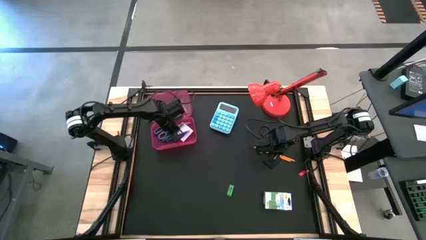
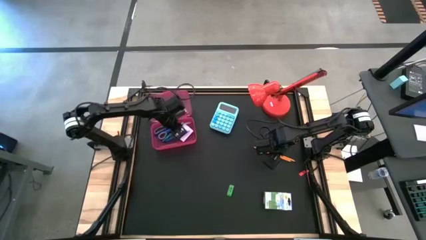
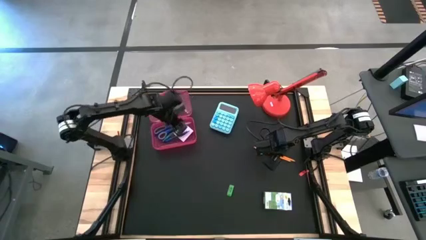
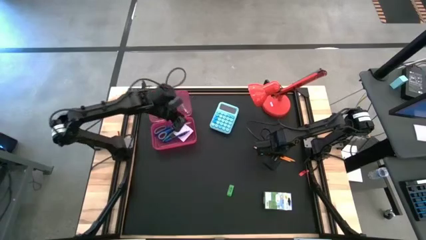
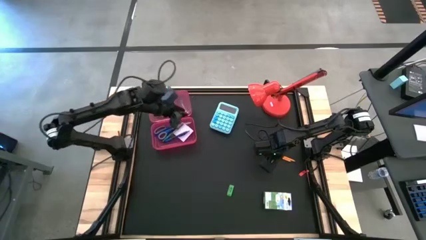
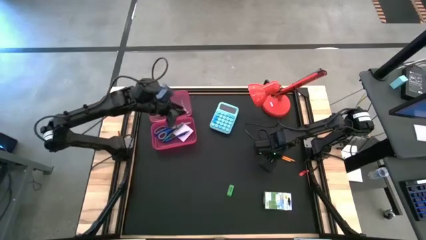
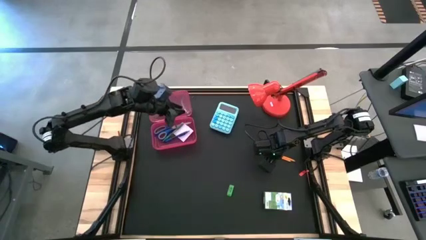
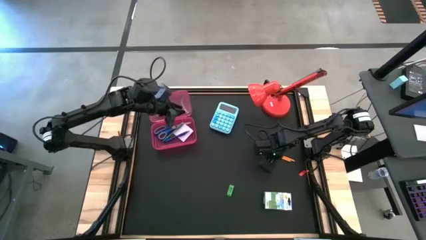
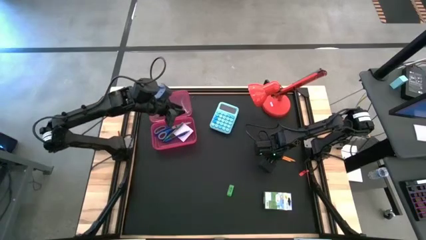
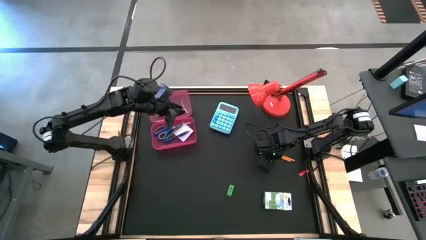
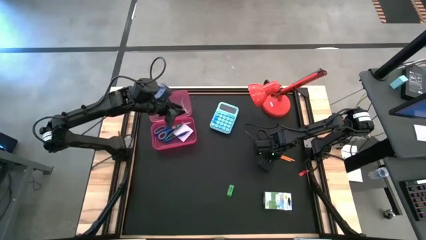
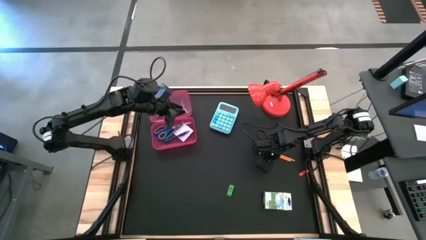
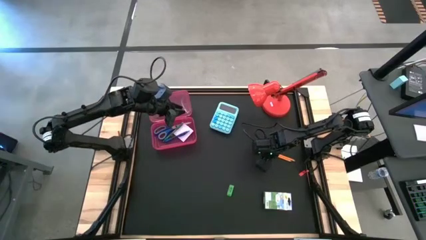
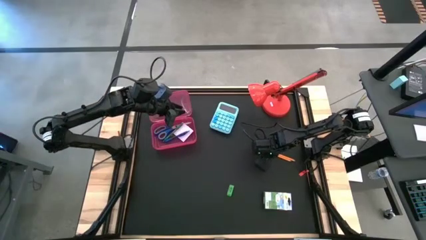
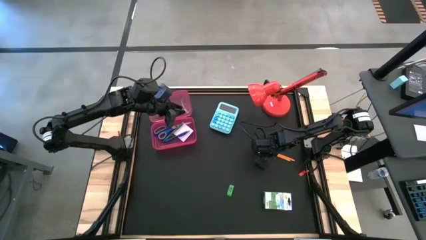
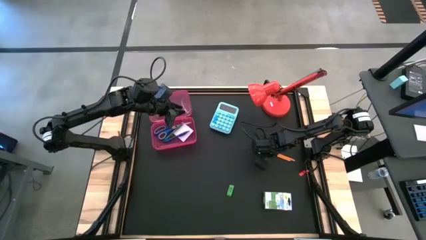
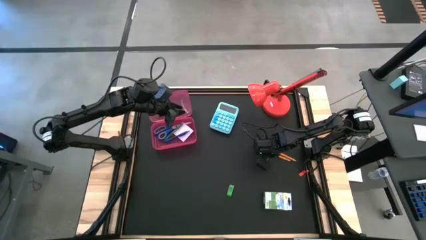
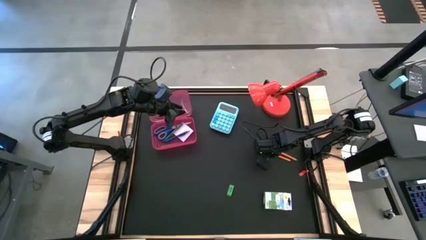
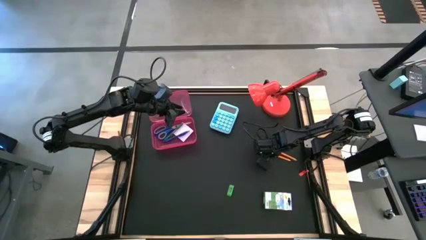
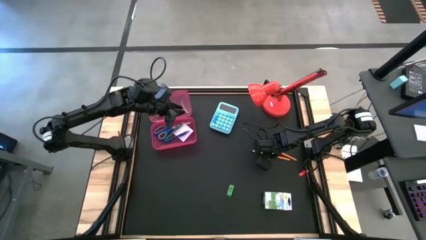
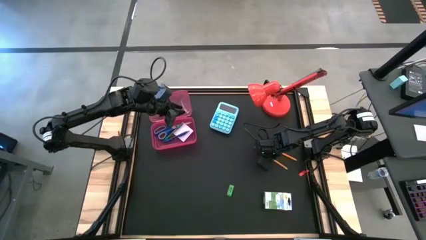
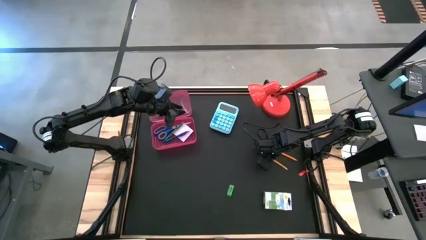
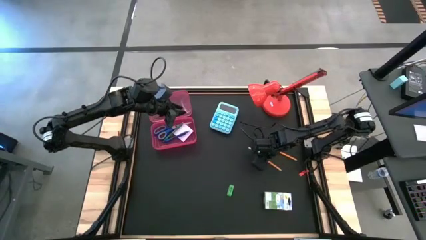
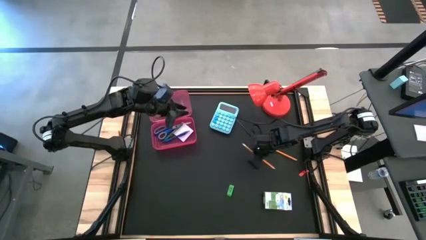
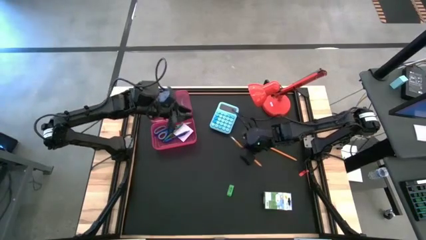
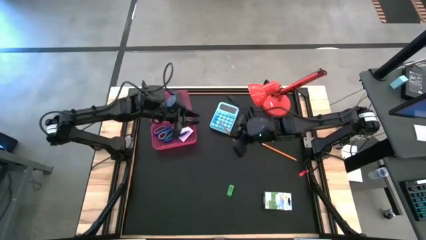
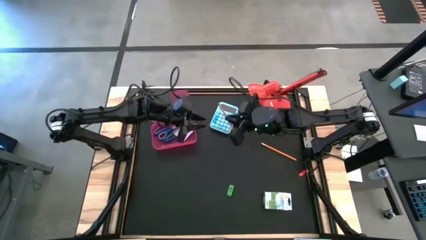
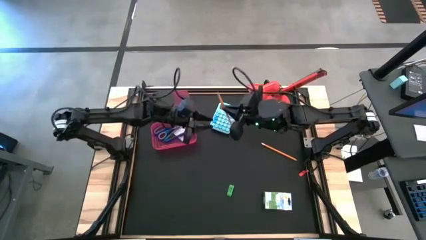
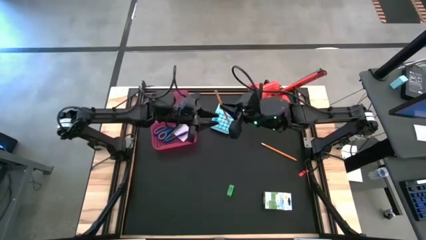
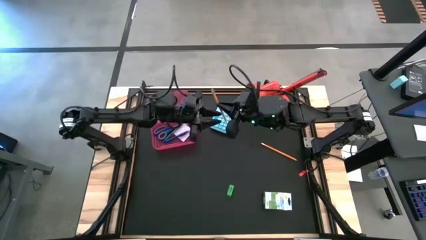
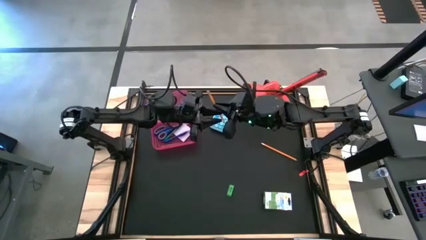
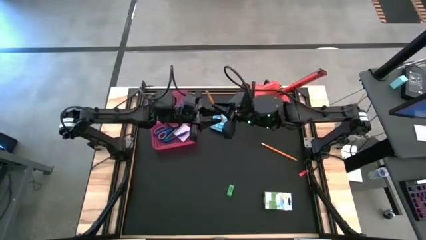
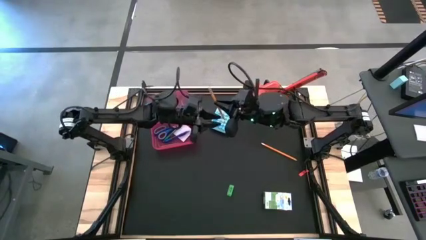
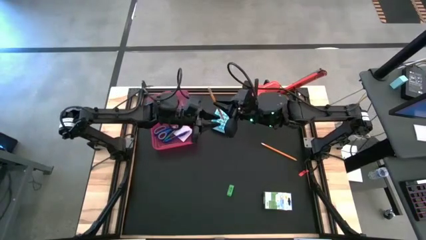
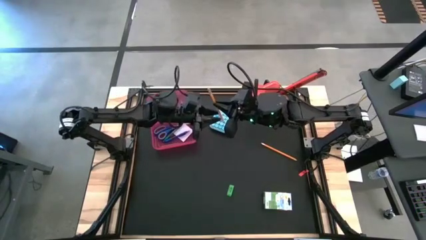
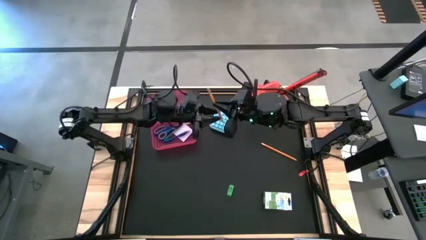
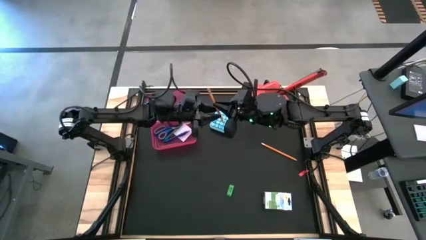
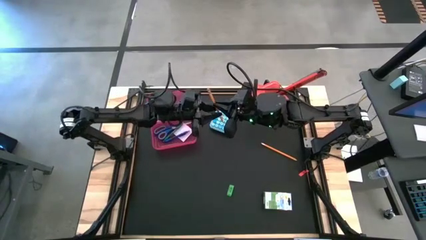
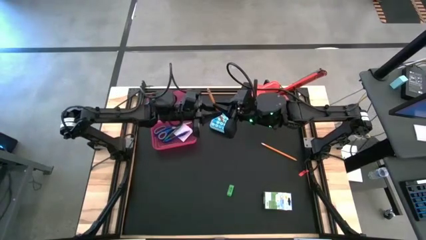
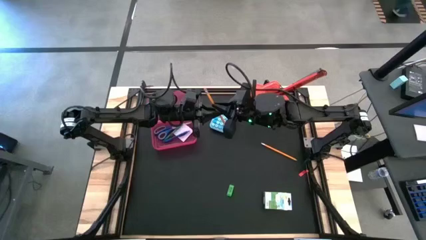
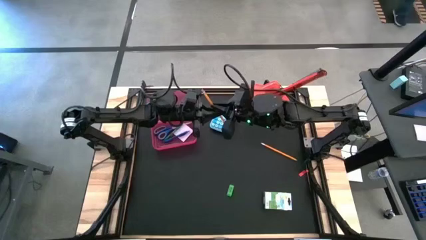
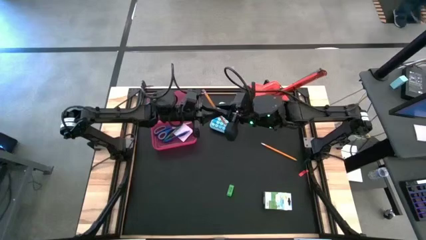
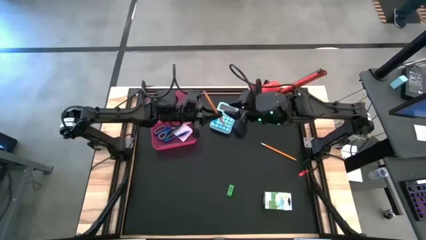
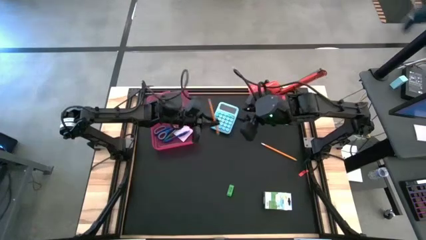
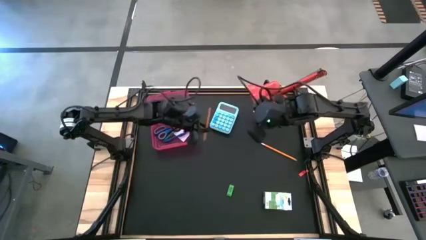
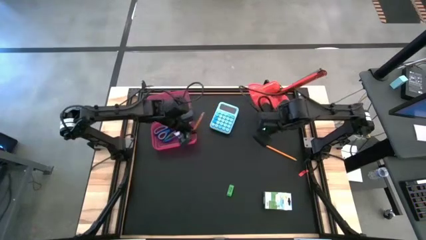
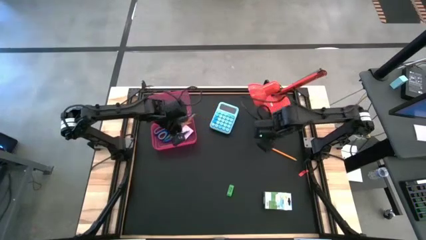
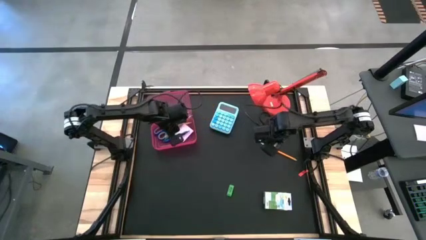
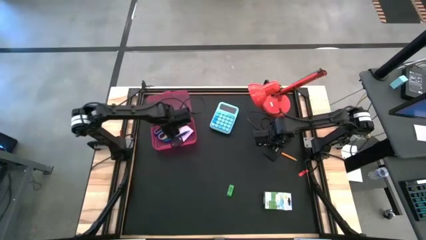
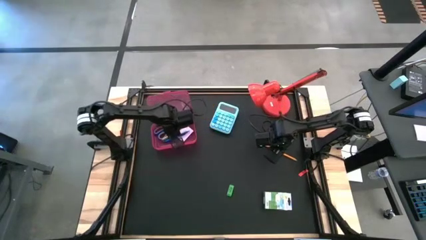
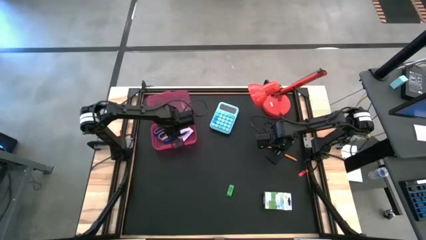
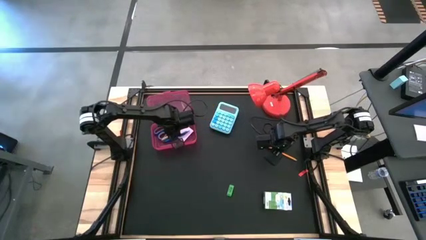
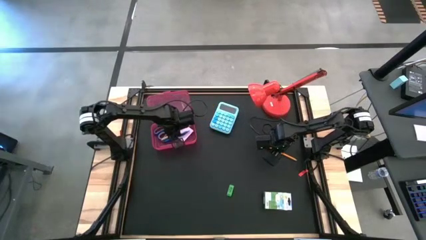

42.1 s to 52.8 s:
Task: Pack school essentials
Put the bottom yellow pencil into the pink supply box

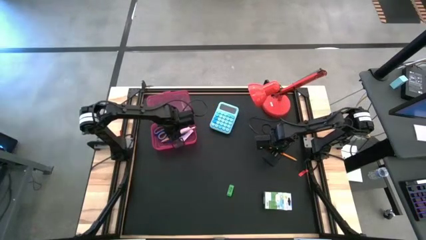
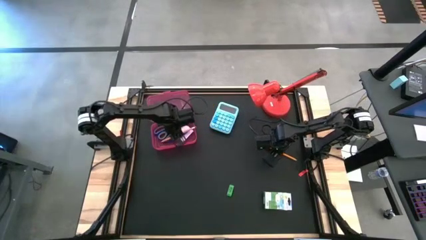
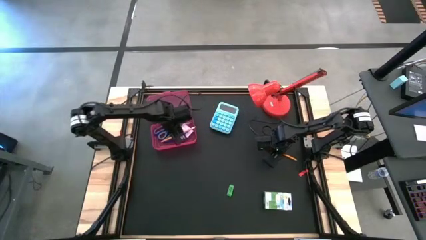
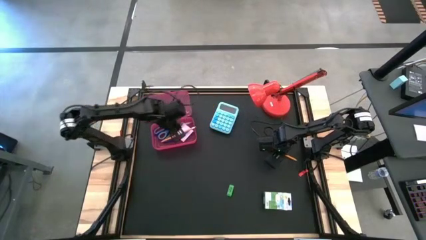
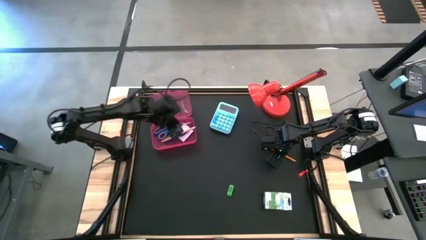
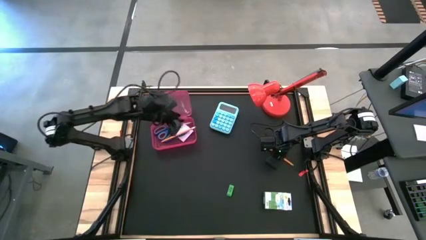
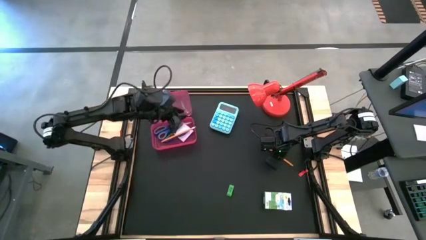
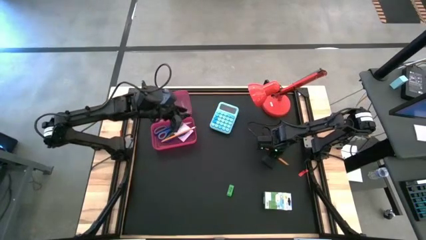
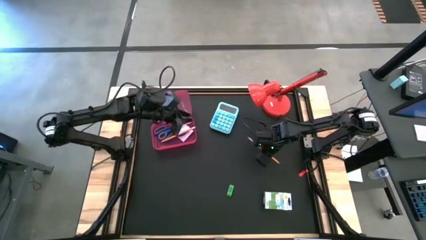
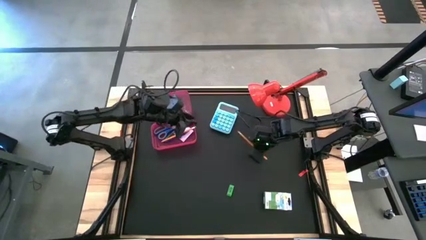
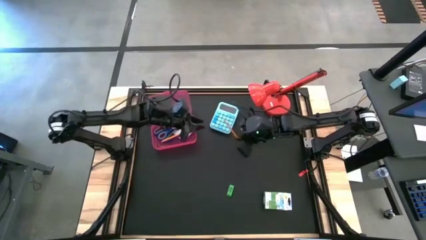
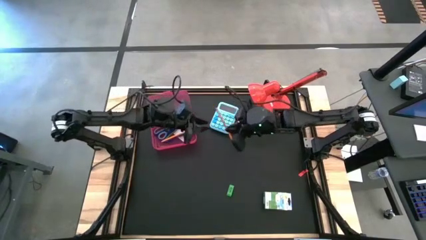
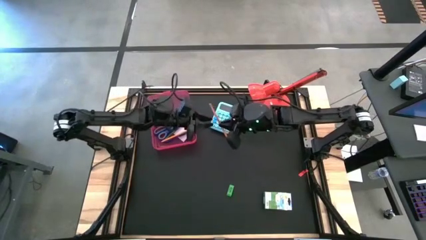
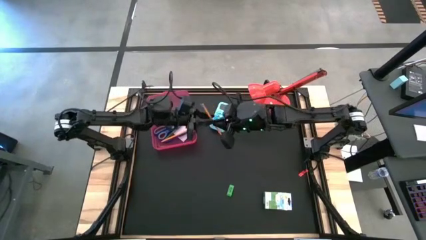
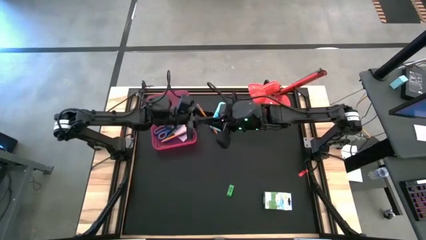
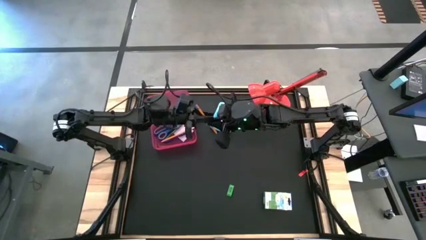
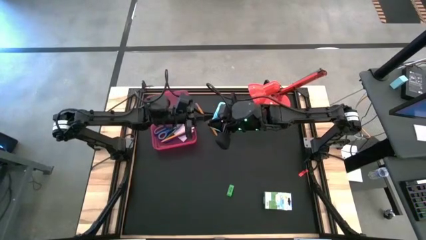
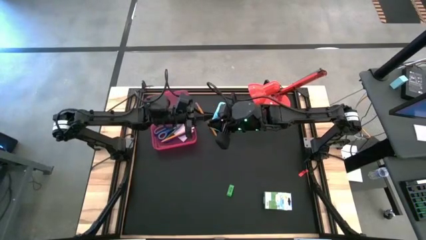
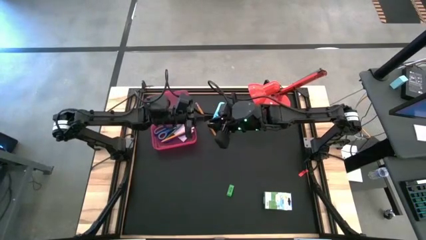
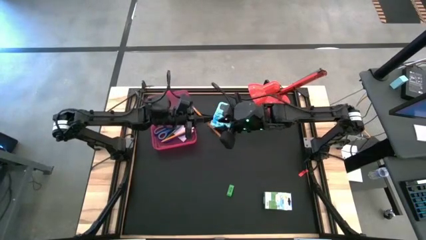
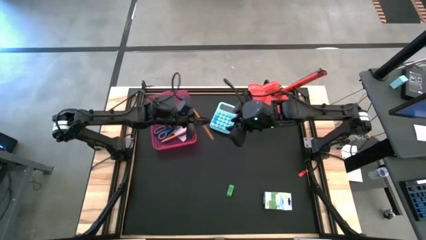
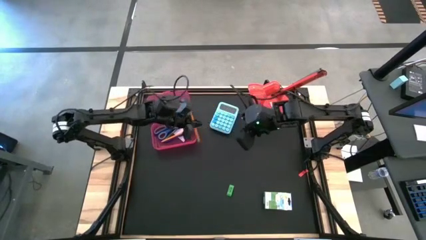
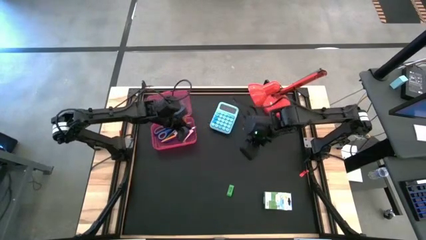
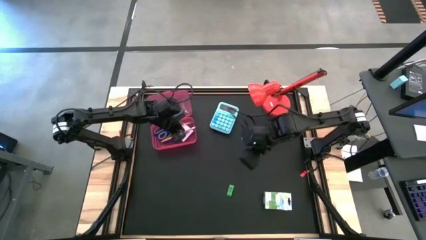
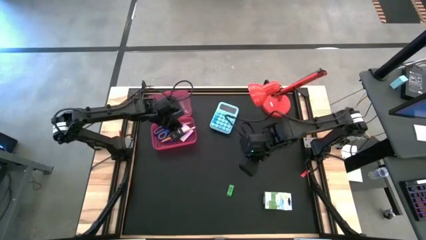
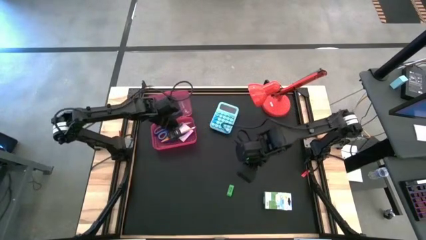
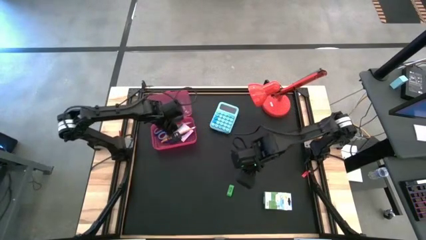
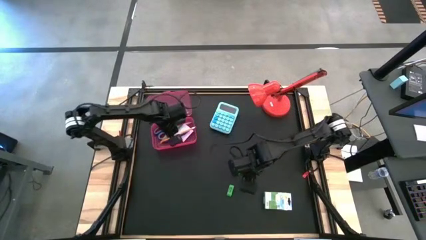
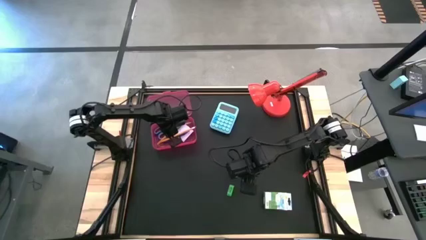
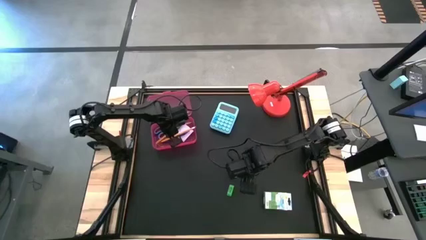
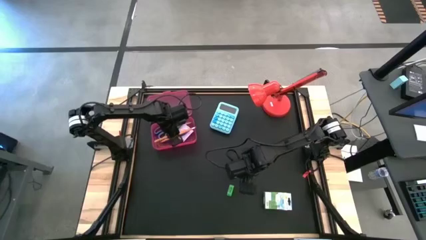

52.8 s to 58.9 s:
Put the yellow pencil into the pink supply box
